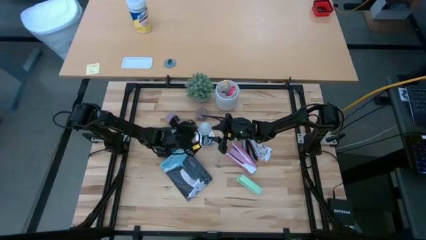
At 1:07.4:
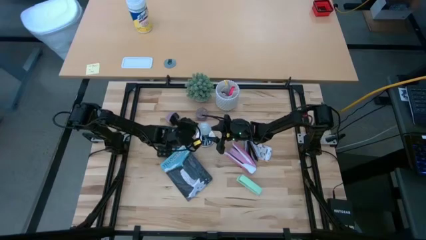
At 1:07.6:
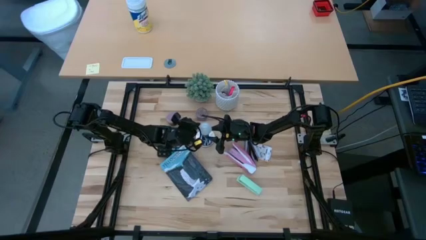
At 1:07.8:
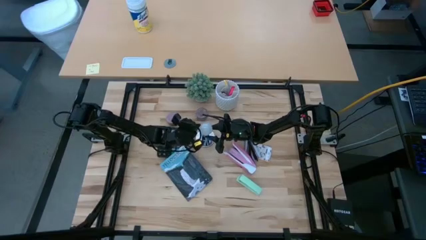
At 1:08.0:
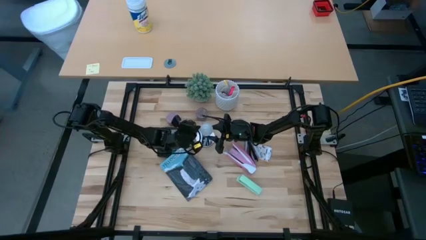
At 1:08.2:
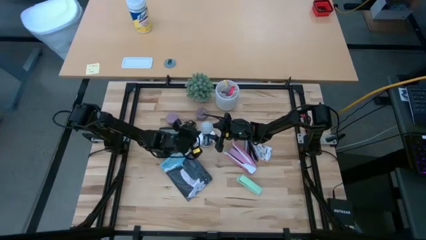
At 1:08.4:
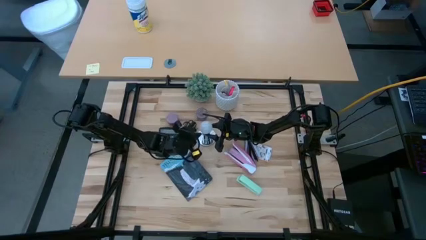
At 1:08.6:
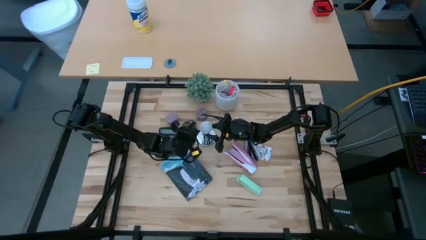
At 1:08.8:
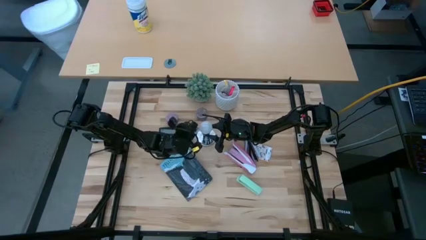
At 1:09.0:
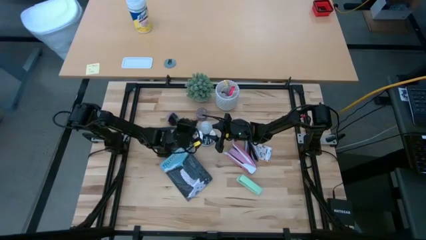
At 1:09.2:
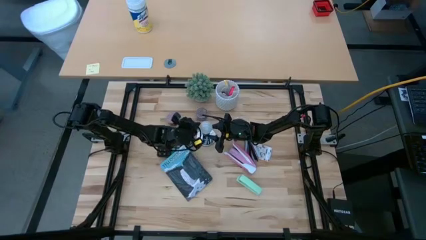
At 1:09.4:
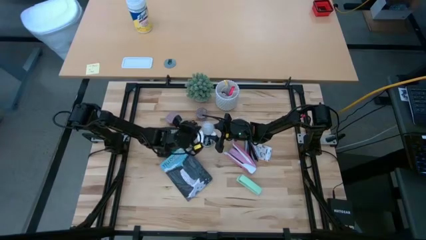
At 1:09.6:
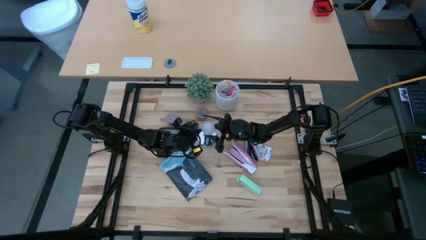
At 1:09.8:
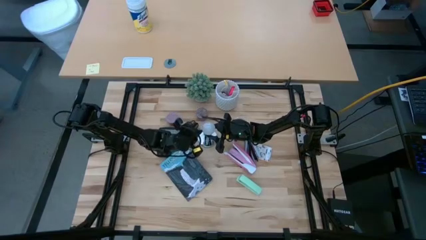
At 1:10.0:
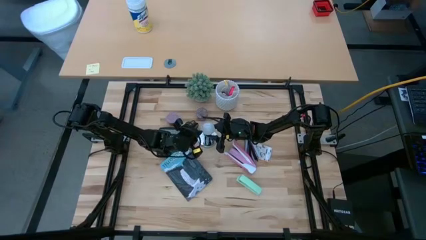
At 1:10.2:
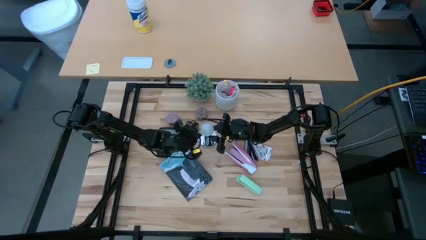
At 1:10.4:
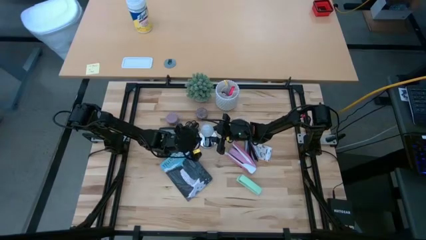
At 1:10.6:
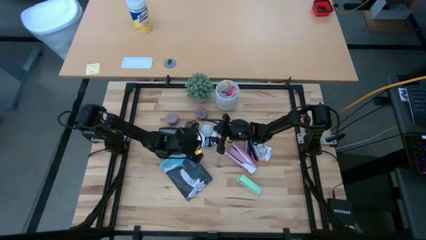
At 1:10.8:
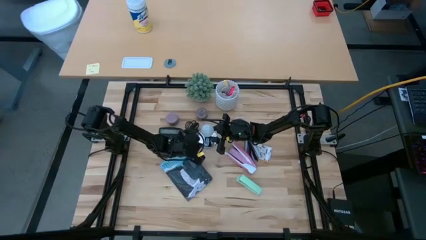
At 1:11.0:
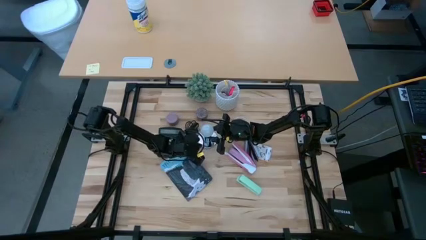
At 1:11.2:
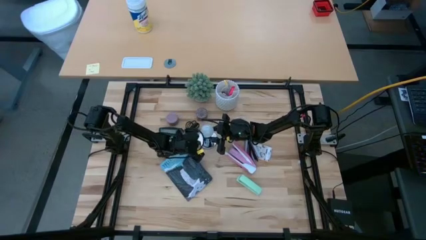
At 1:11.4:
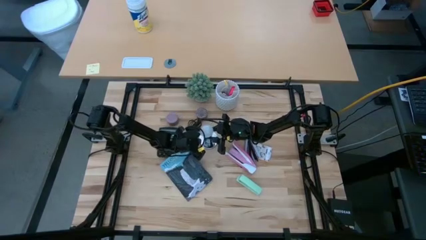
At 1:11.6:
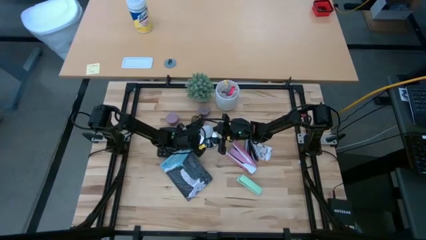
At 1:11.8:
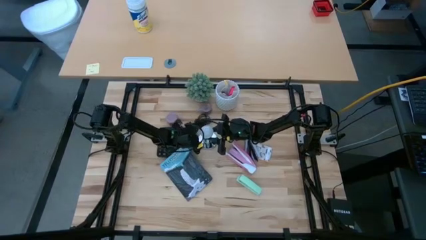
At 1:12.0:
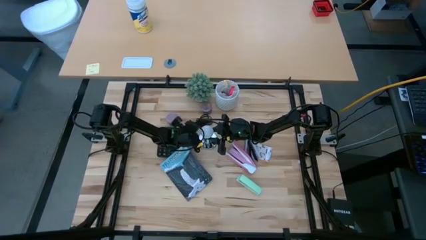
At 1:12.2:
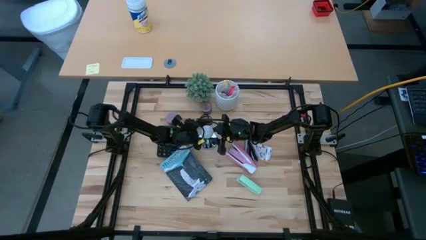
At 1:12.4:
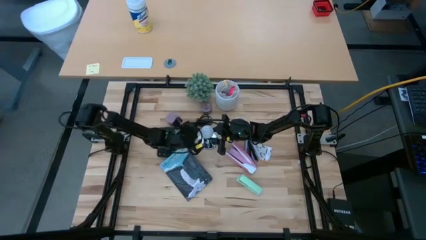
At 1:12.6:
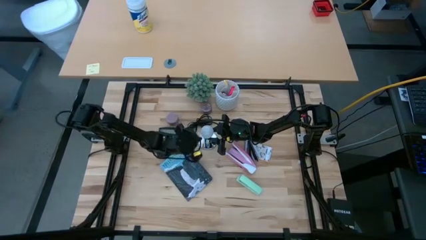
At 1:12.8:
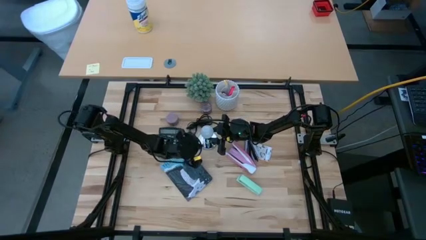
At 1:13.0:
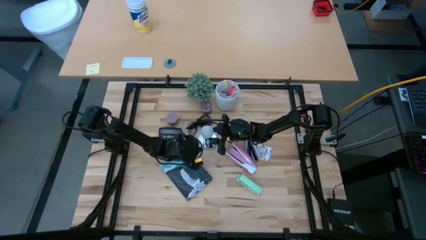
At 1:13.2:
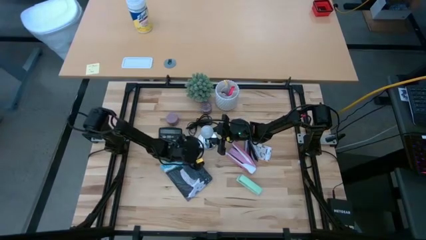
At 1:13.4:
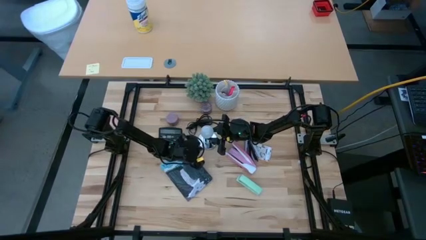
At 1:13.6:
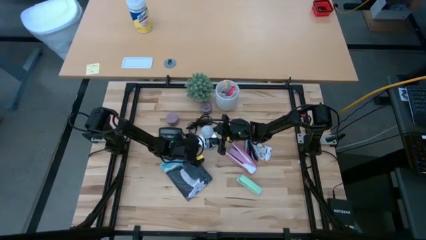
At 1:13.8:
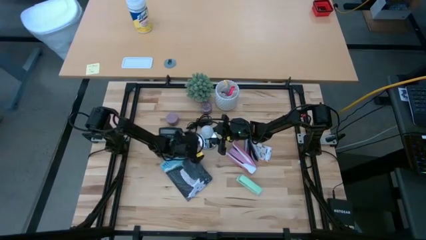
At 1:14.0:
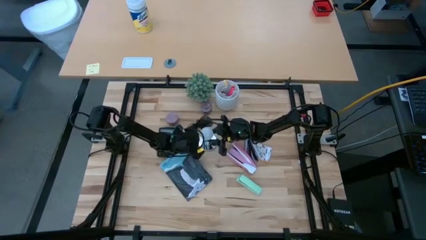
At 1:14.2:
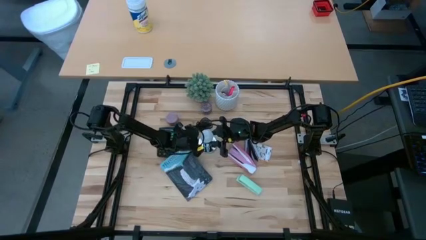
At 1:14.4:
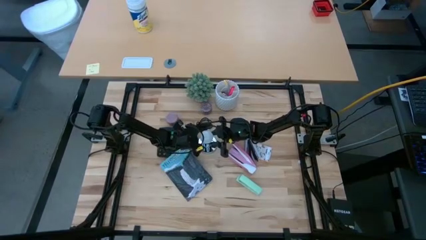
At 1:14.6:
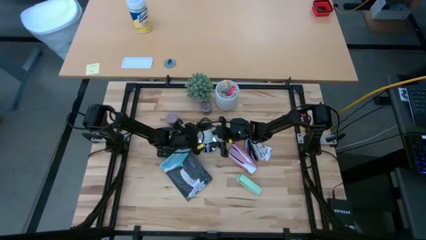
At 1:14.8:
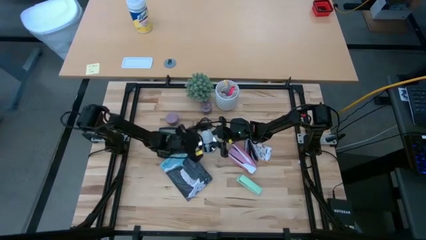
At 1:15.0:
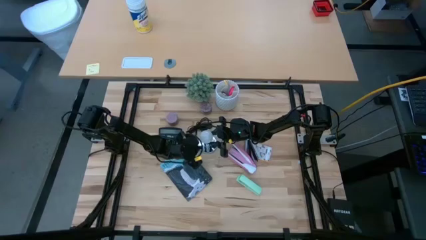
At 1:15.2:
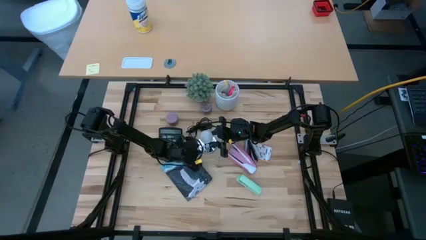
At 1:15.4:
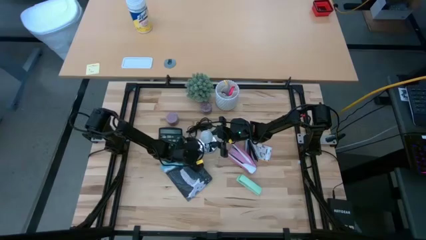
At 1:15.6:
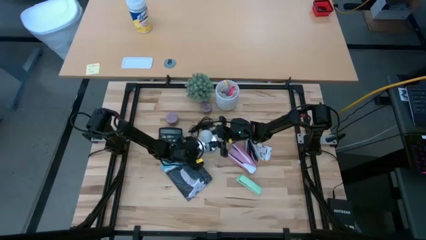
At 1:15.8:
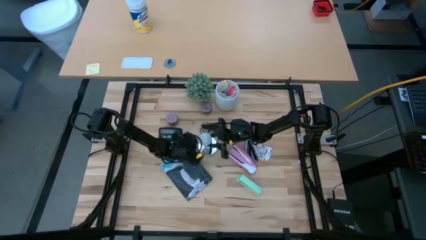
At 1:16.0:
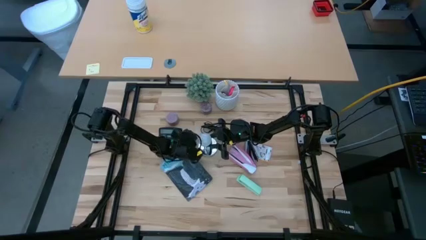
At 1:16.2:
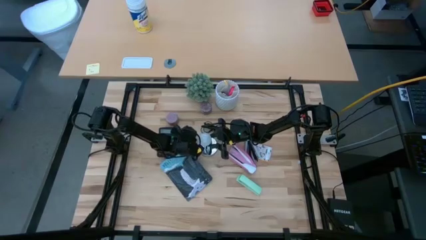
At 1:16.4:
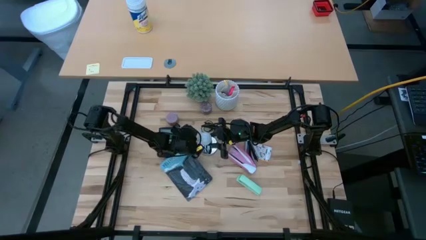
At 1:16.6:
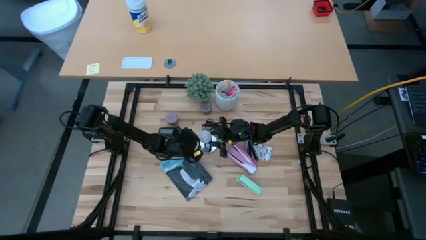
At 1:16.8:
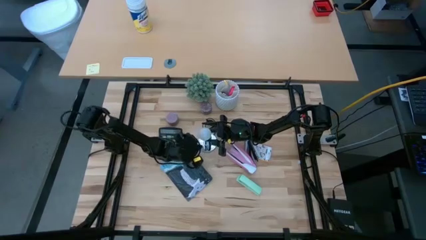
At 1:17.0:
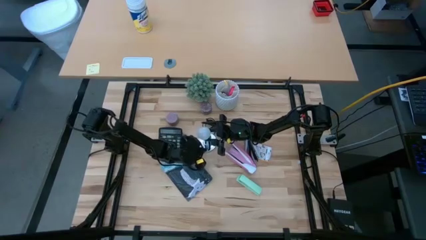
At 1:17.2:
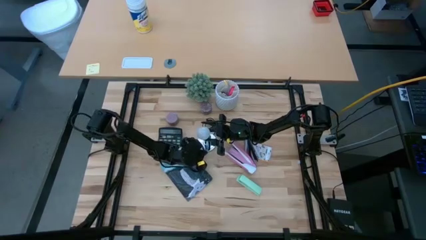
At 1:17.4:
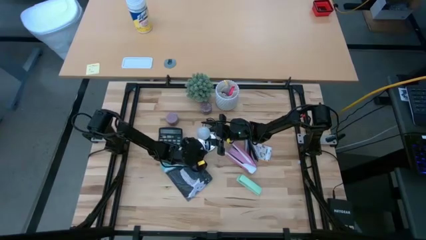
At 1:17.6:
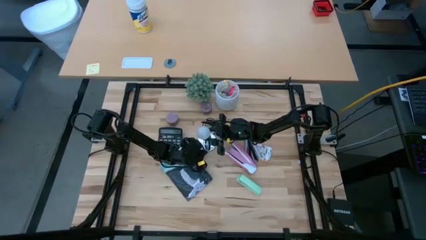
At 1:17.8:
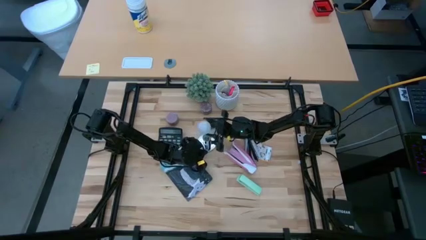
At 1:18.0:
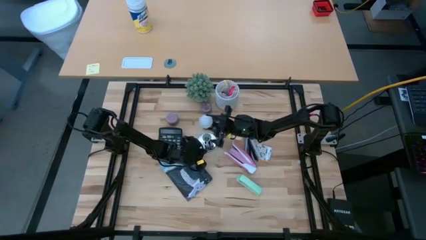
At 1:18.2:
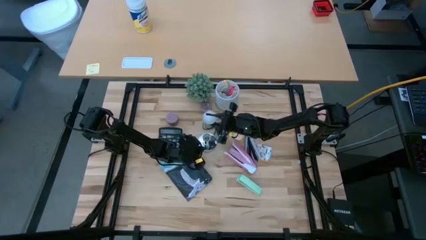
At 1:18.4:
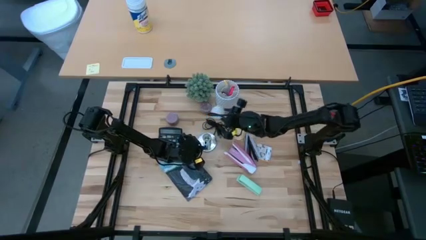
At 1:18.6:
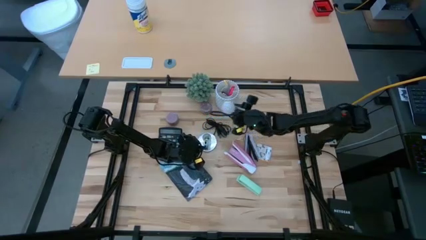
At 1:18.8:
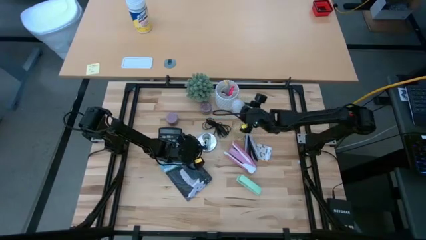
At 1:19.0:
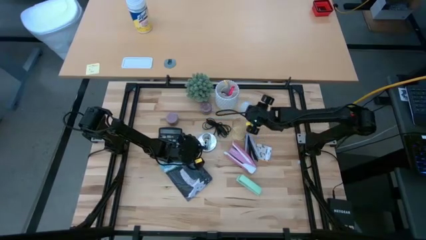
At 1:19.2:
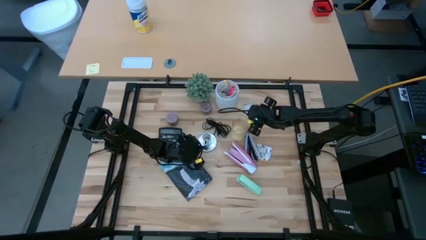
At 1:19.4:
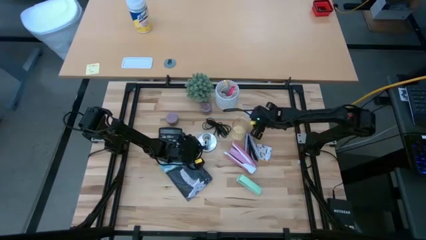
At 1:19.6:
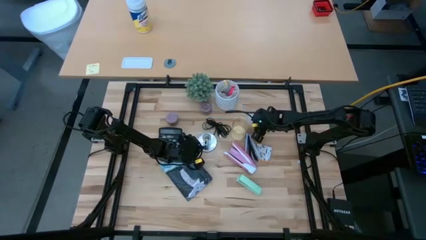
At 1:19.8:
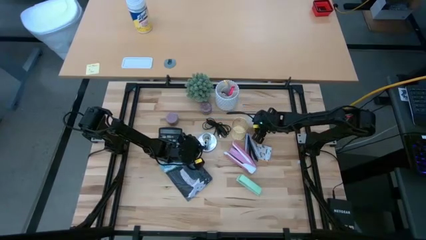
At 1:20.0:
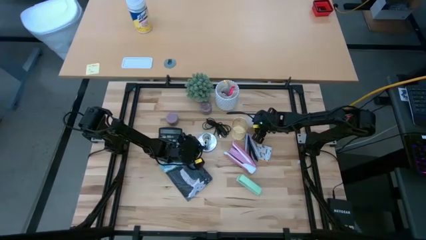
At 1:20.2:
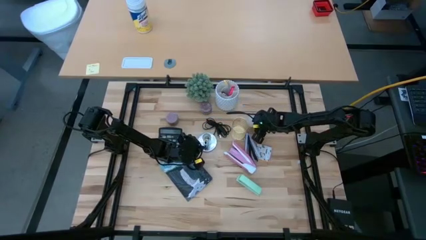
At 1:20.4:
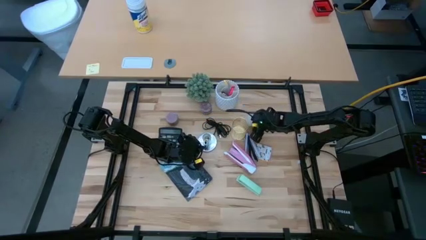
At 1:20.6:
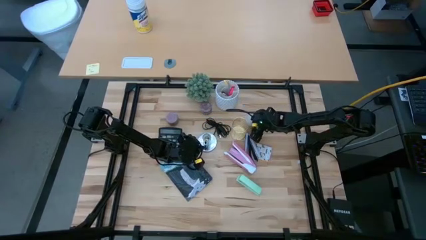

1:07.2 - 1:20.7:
Task: Screw lightbulb
Remove the lightbulb from the lamp
